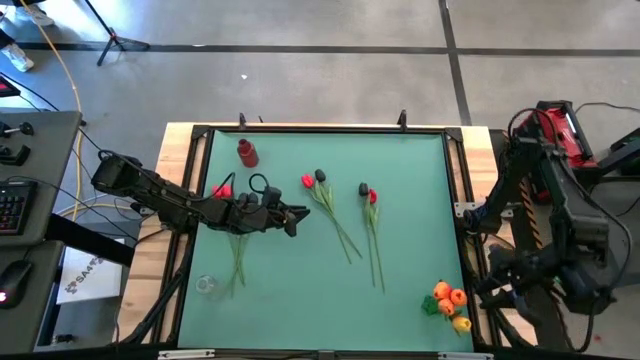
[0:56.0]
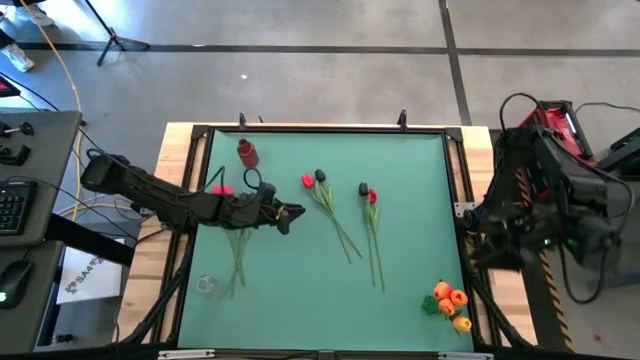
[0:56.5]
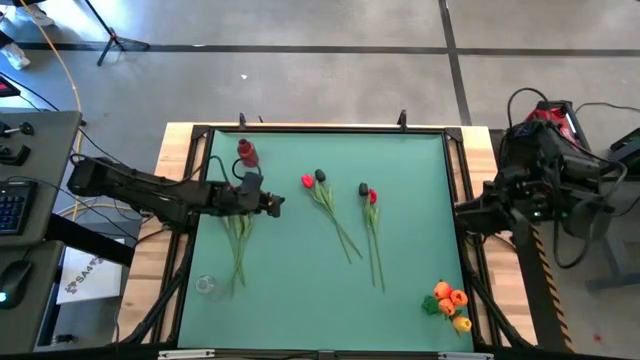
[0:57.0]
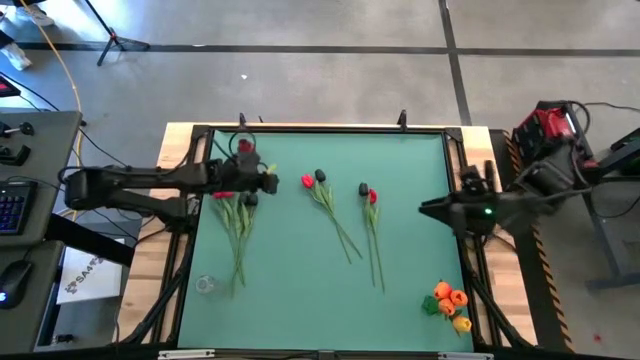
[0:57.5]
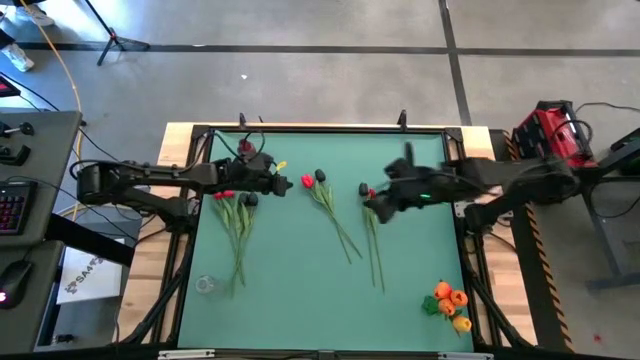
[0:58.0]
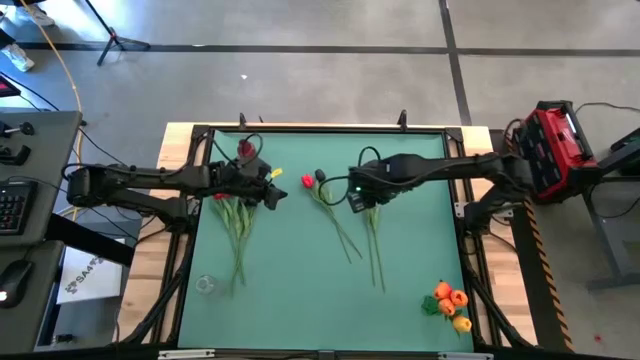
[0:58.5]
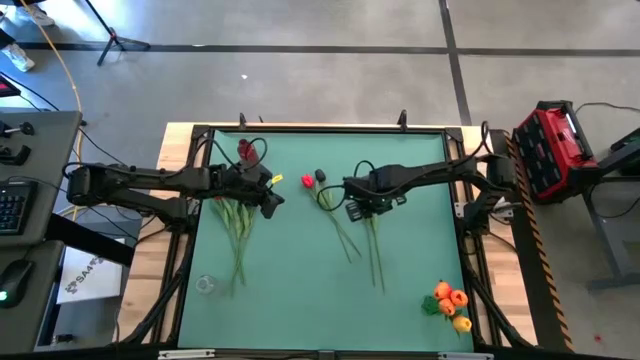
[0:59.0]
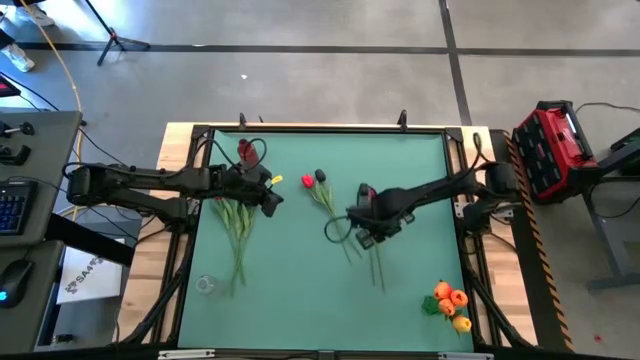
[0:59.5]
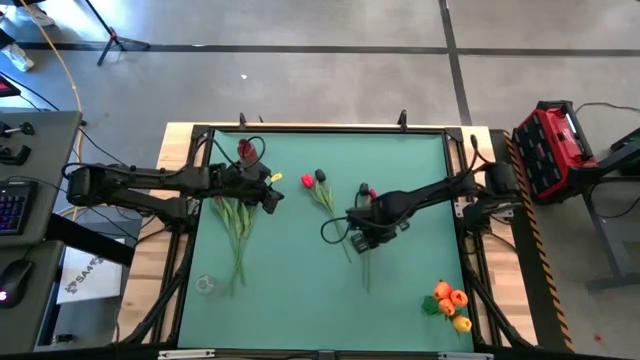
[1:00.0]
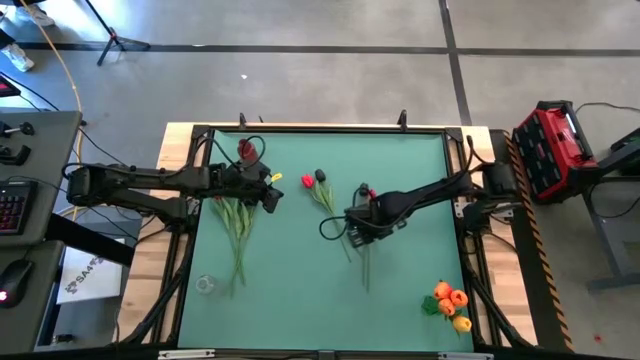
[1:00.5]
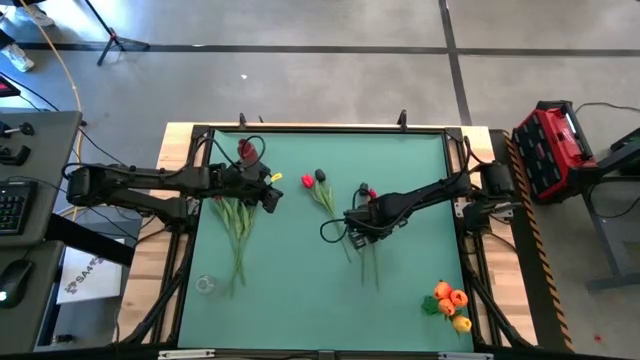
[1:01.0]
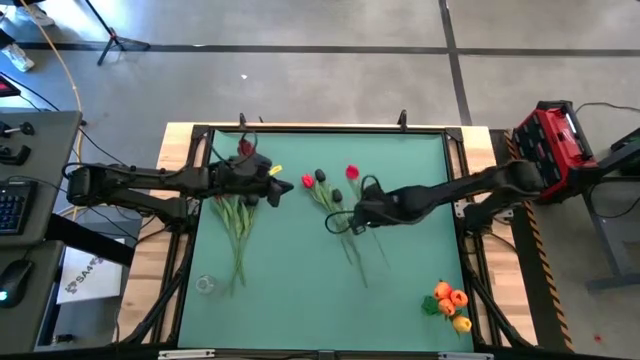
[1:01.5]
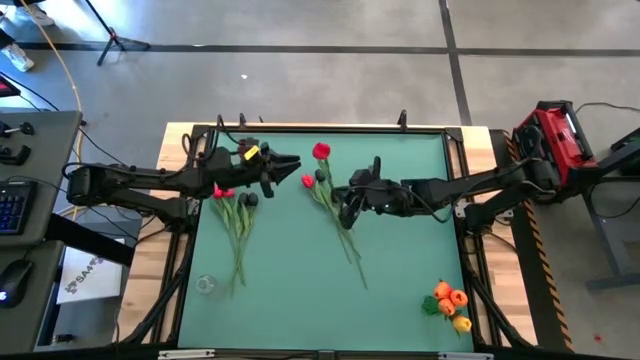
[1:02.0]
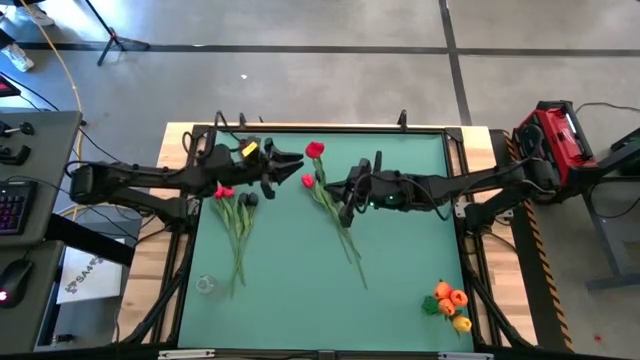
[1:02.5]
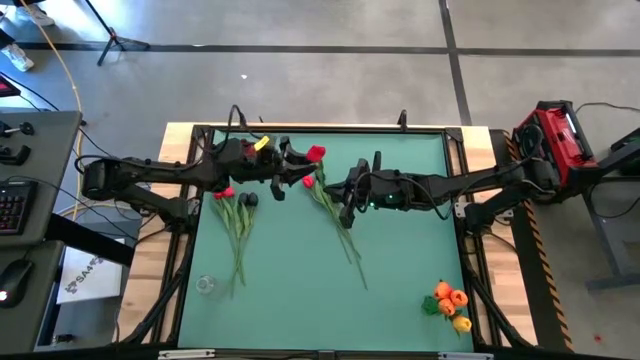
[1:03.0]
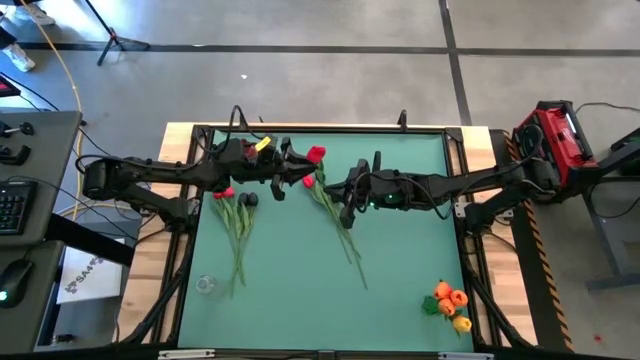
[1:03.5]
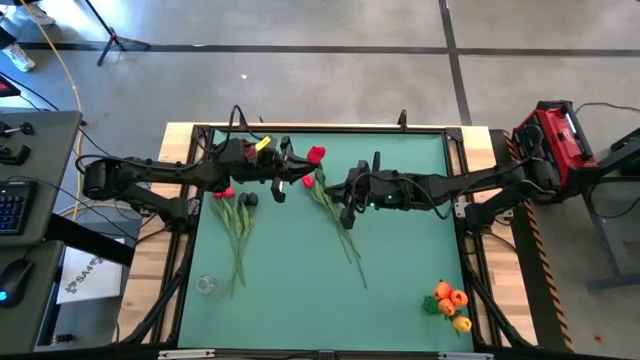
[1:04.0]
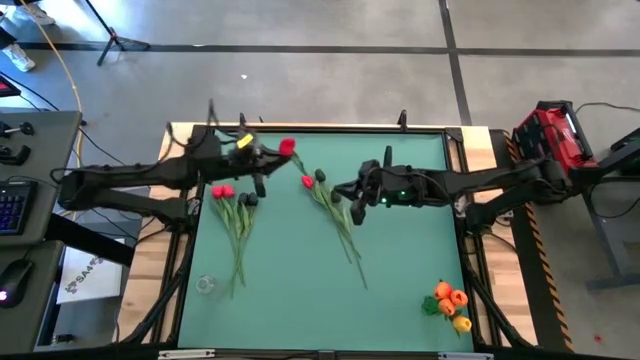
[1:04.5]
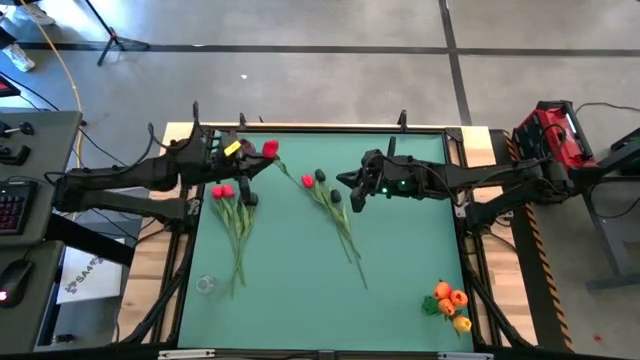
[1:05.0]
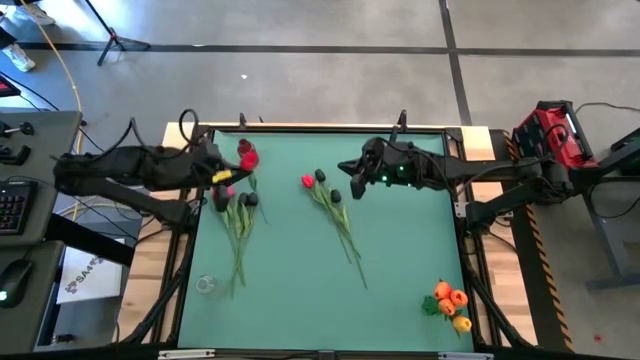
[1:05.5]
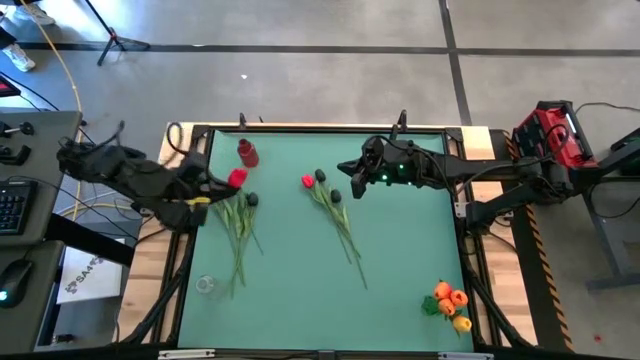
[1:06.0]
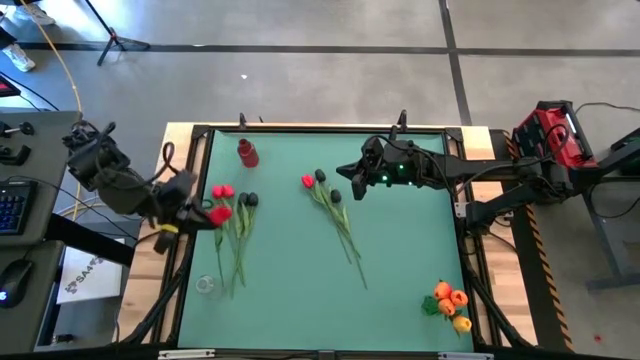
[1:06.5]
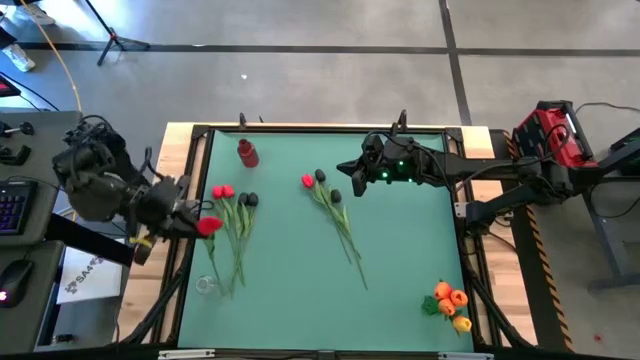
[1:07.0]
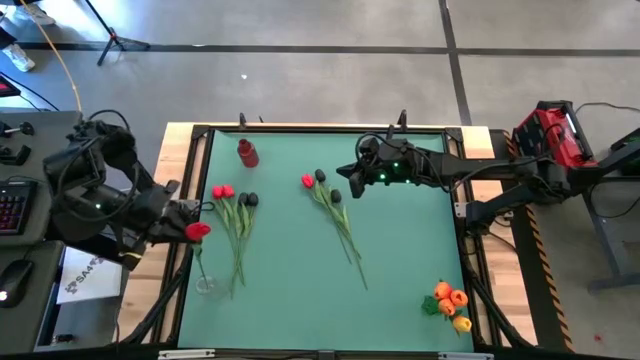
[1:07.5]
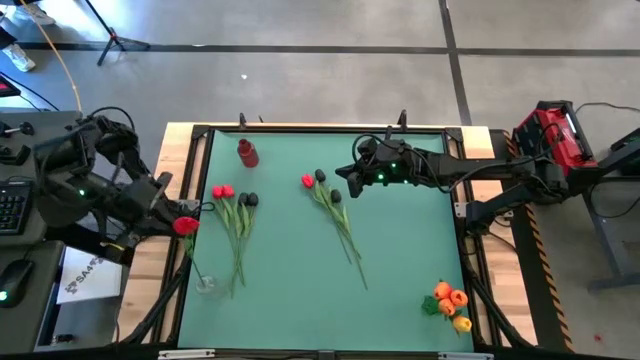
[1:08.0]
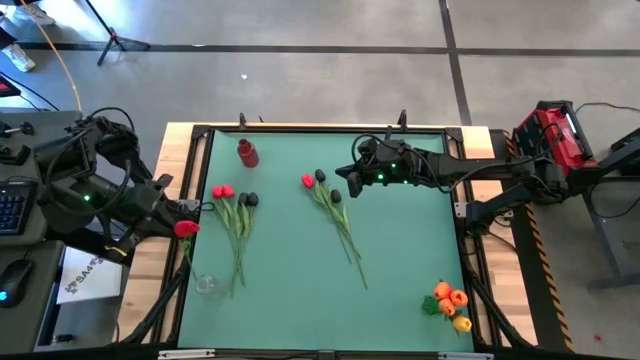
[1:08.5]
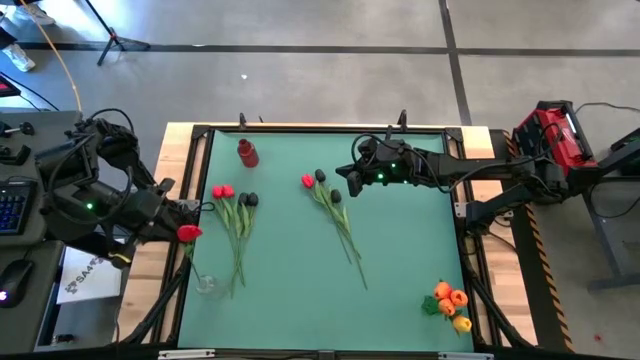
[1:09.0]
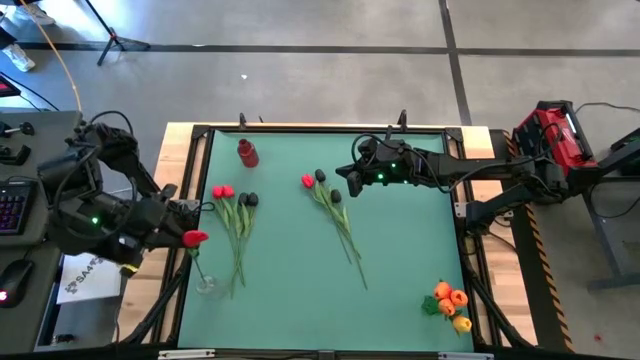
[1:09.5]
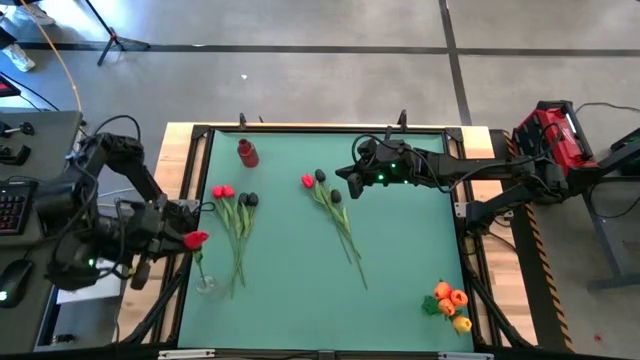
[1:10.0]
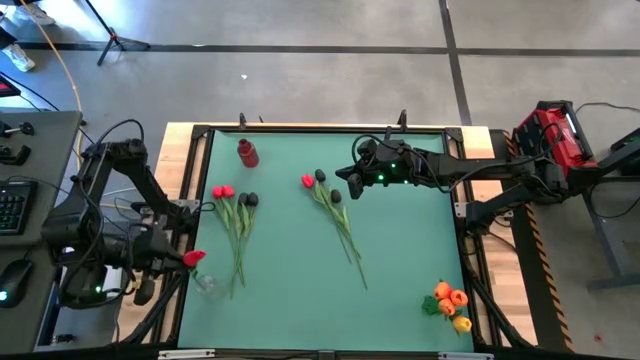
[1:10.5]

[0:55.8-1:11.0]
Task: Sort flowers into vase by color
Put the red flower into the transparent vase
